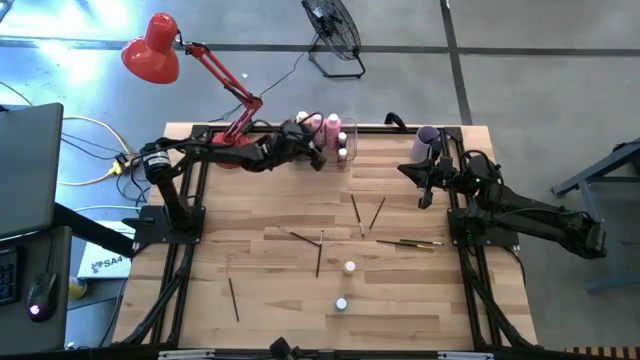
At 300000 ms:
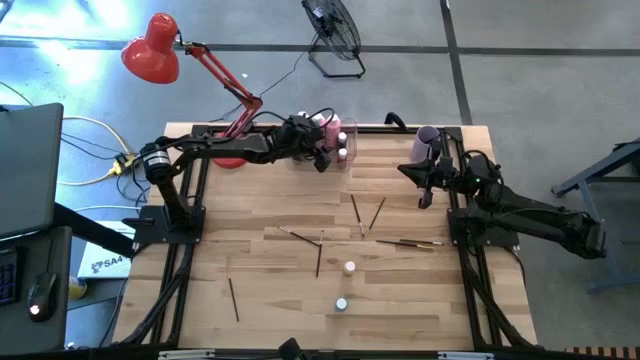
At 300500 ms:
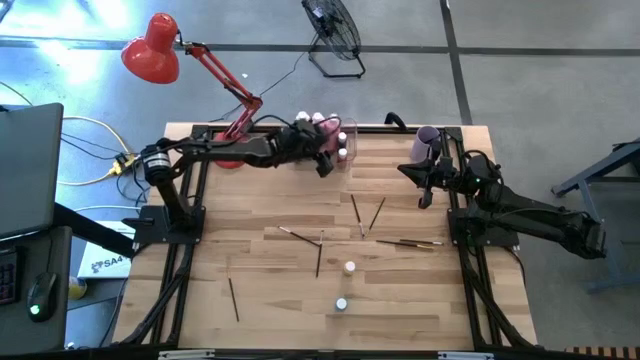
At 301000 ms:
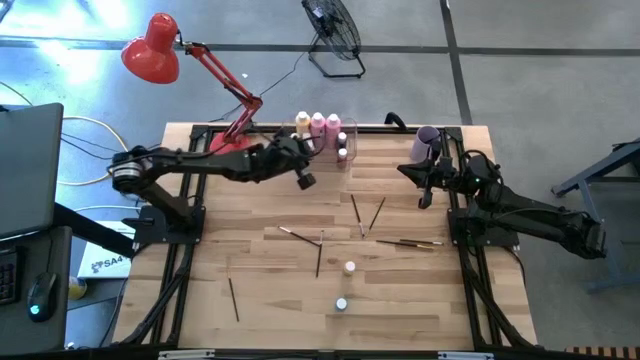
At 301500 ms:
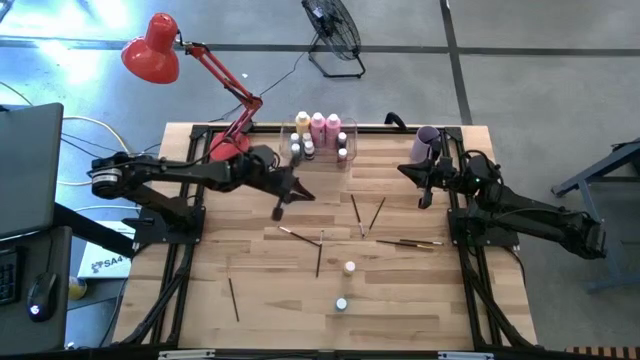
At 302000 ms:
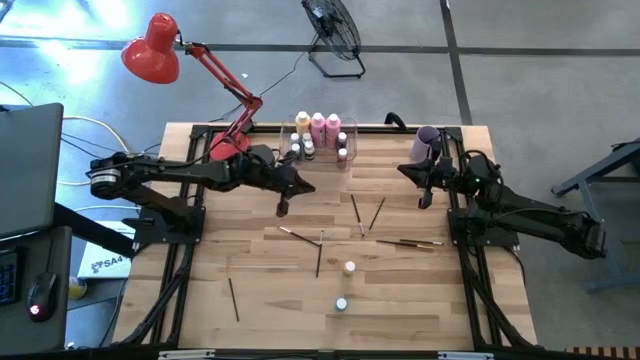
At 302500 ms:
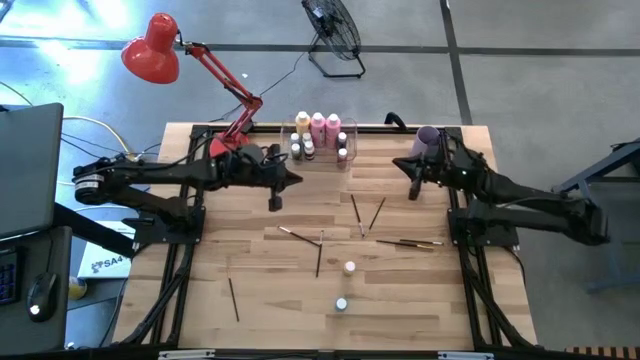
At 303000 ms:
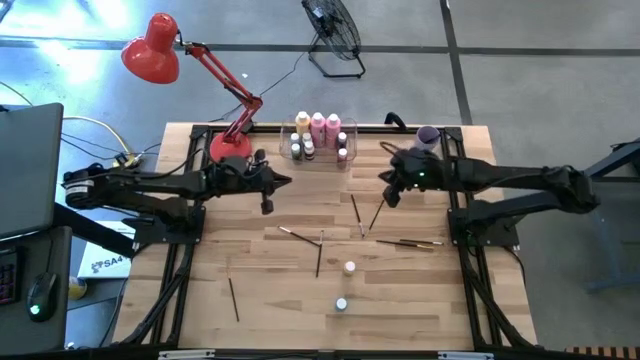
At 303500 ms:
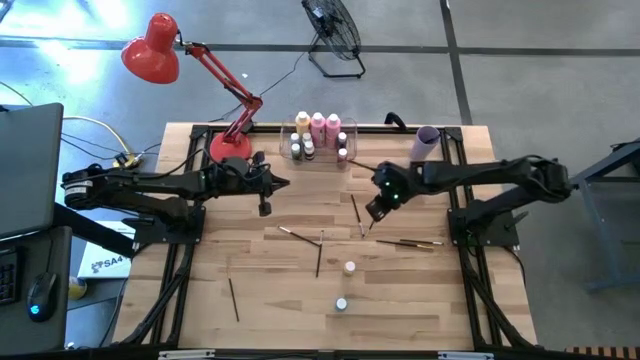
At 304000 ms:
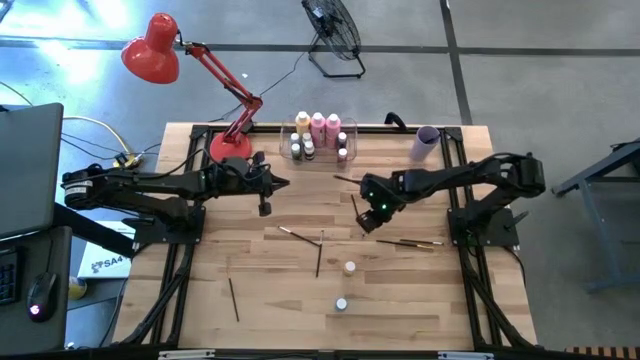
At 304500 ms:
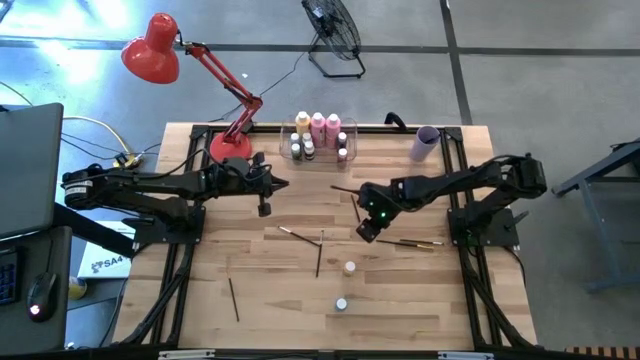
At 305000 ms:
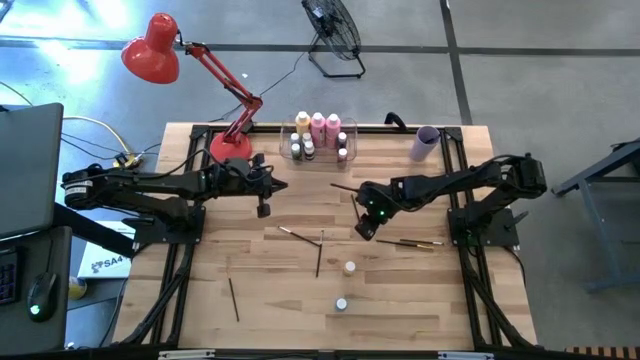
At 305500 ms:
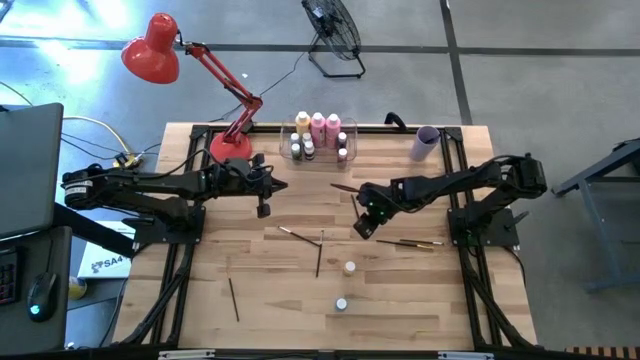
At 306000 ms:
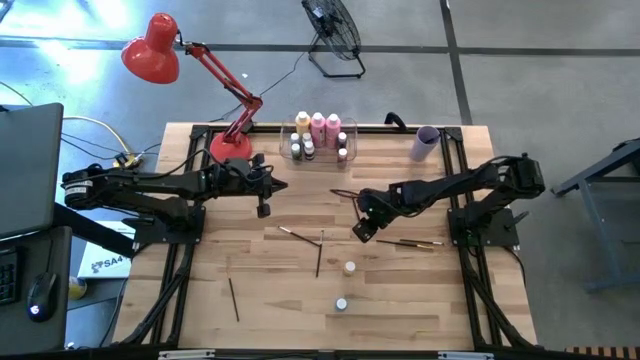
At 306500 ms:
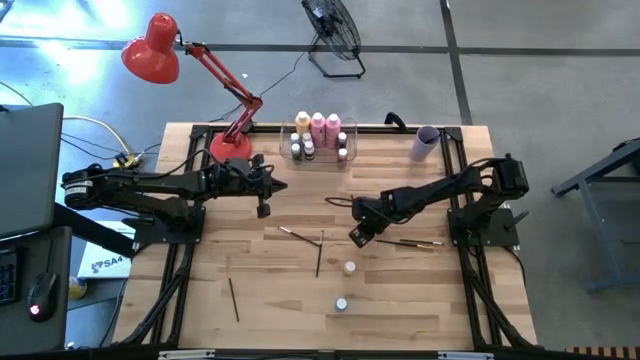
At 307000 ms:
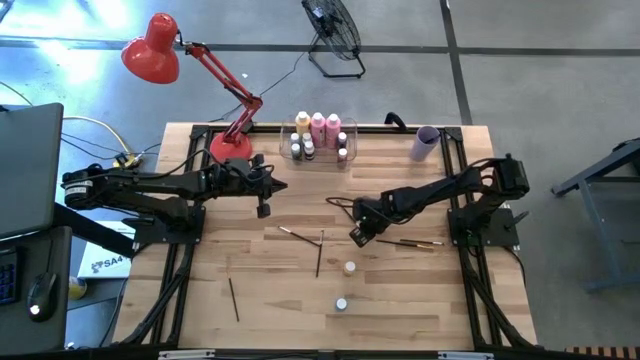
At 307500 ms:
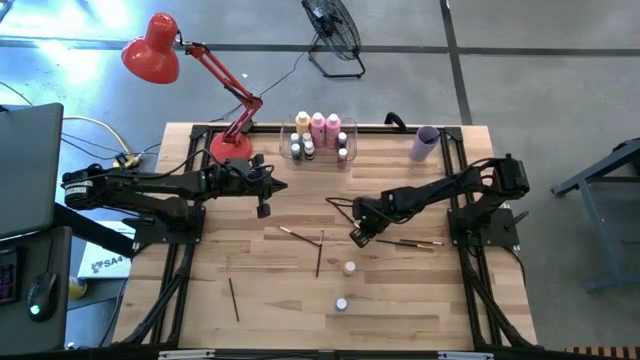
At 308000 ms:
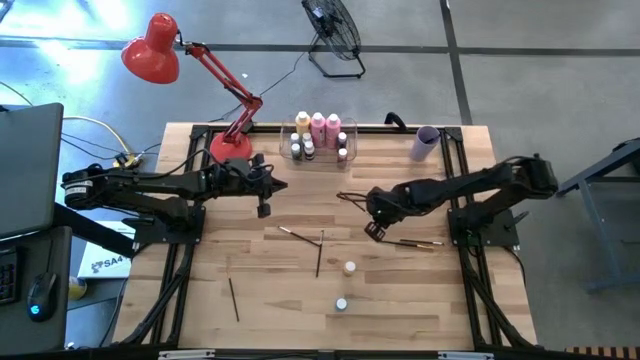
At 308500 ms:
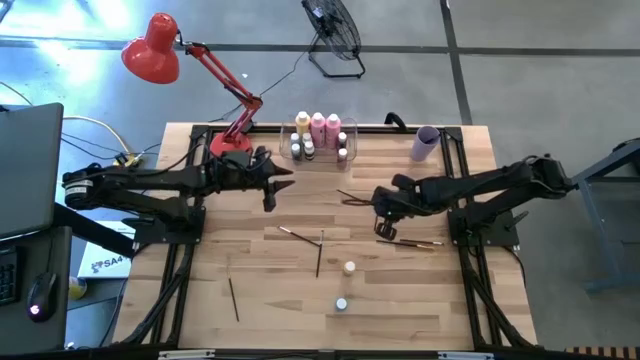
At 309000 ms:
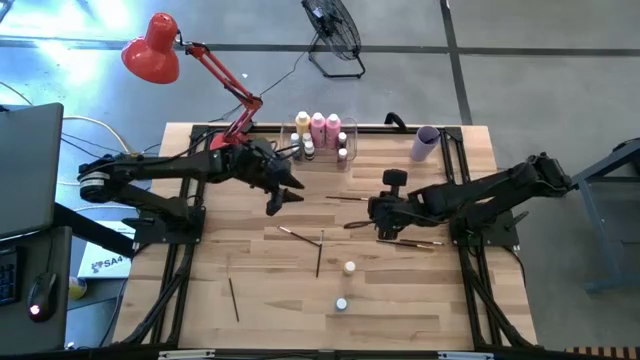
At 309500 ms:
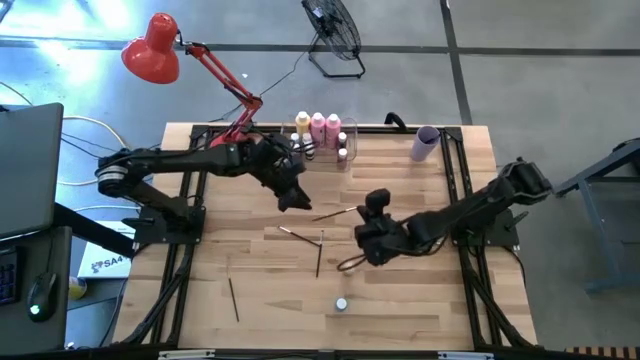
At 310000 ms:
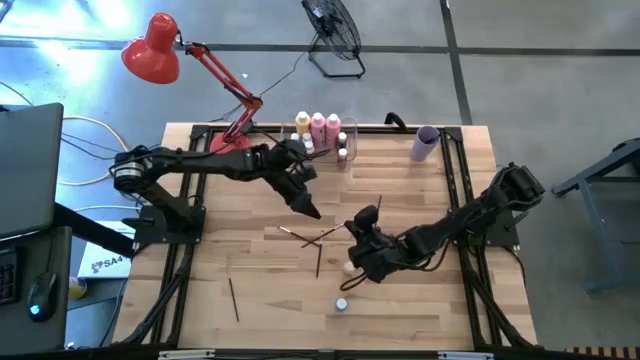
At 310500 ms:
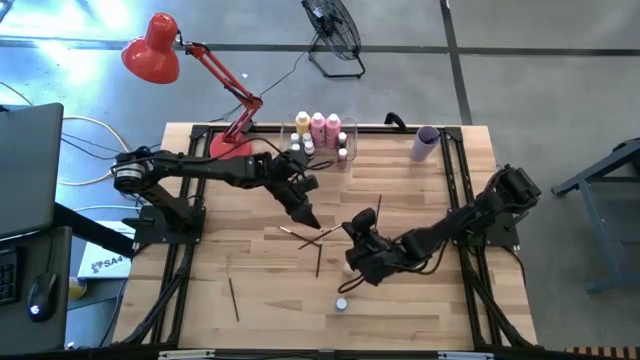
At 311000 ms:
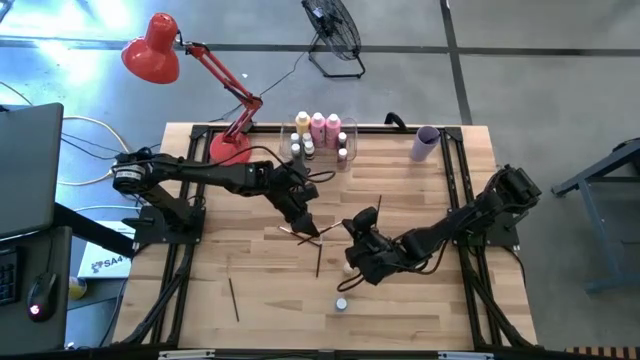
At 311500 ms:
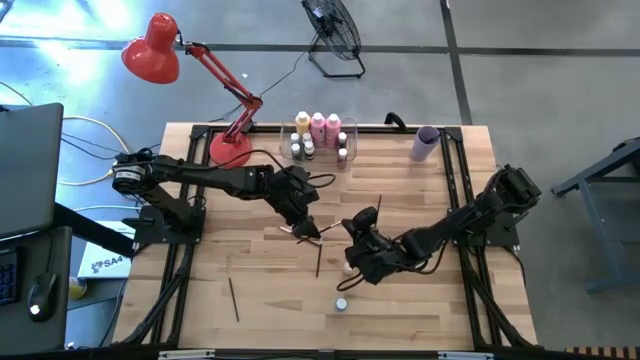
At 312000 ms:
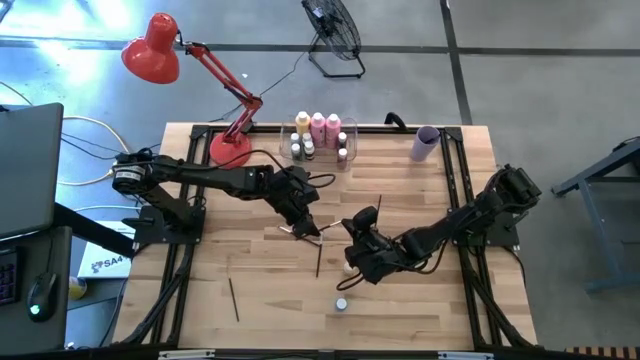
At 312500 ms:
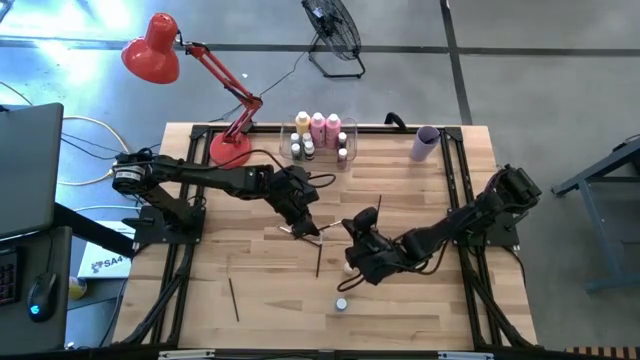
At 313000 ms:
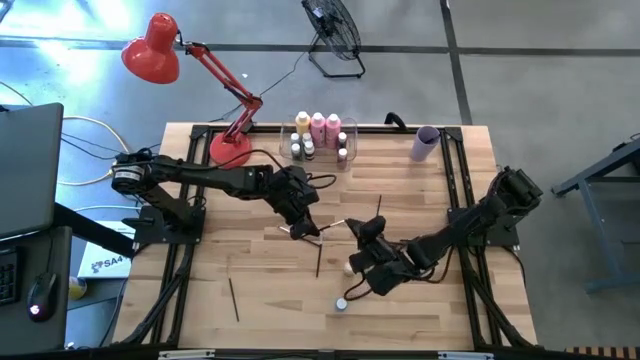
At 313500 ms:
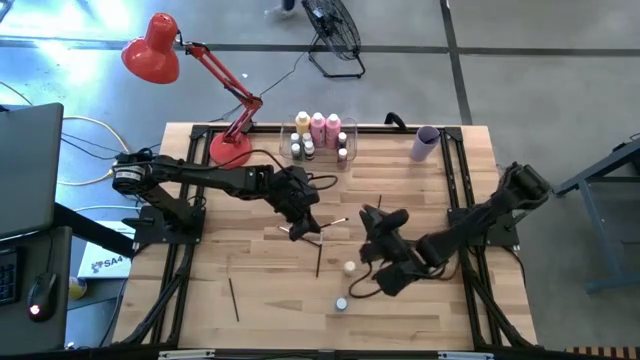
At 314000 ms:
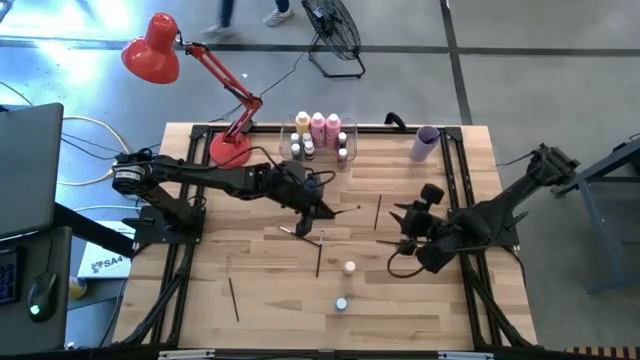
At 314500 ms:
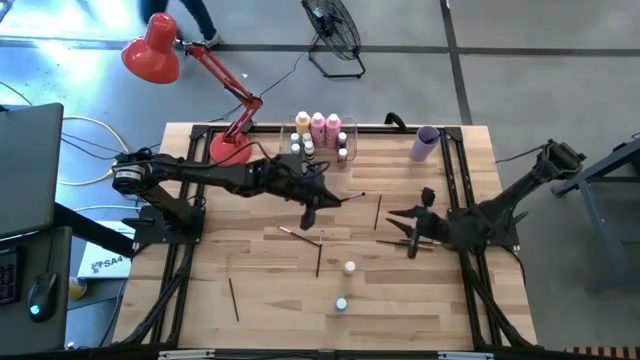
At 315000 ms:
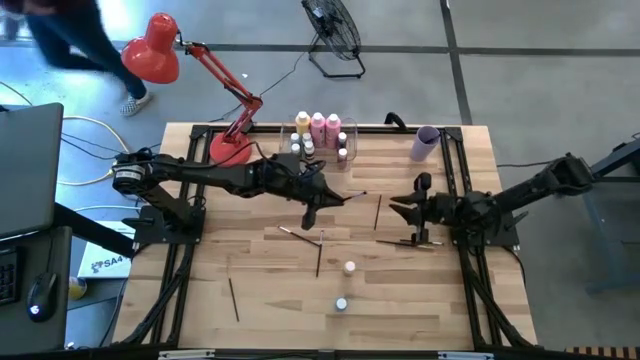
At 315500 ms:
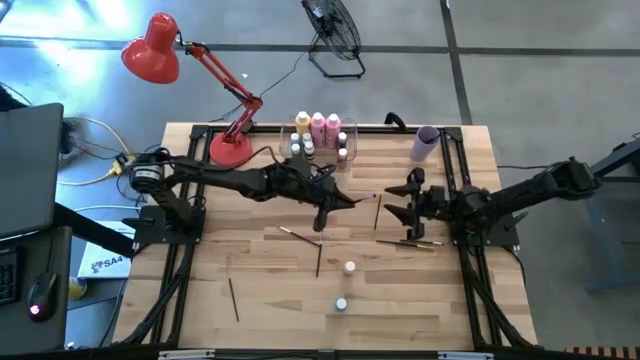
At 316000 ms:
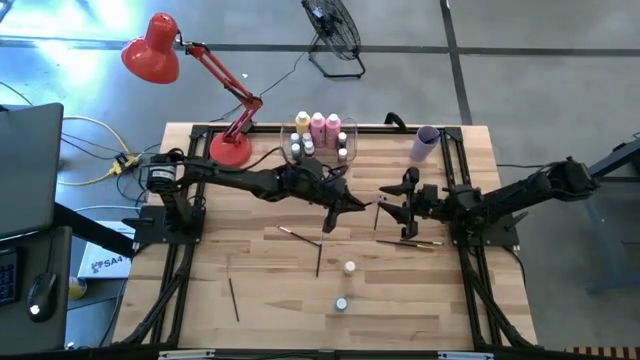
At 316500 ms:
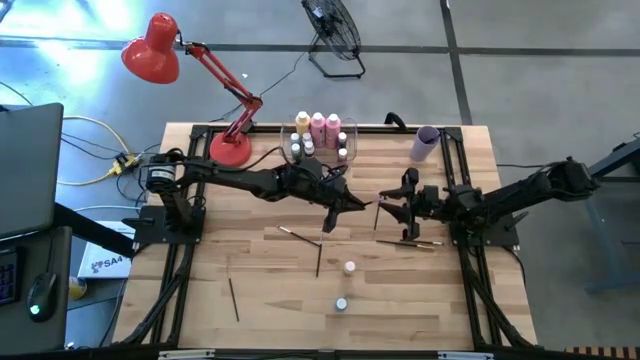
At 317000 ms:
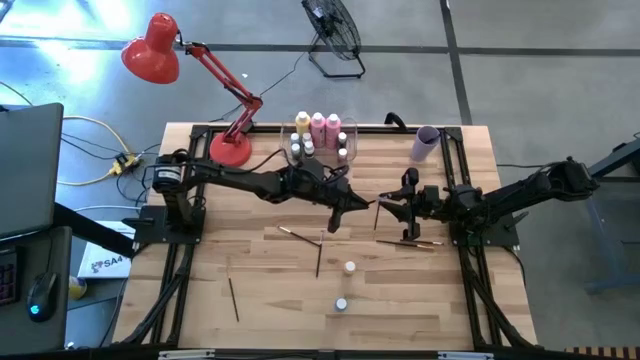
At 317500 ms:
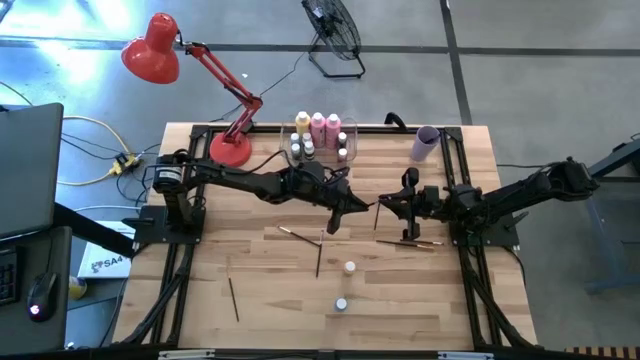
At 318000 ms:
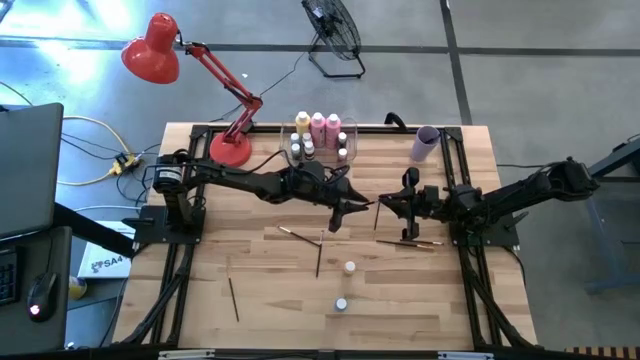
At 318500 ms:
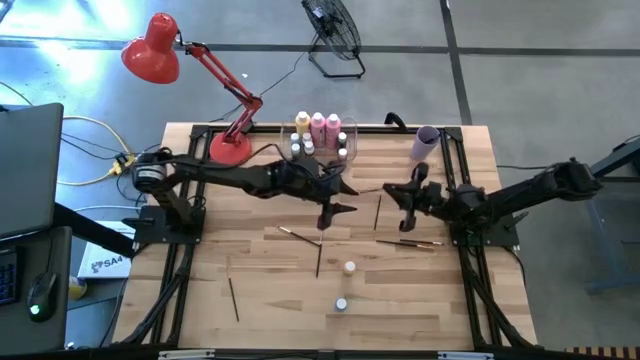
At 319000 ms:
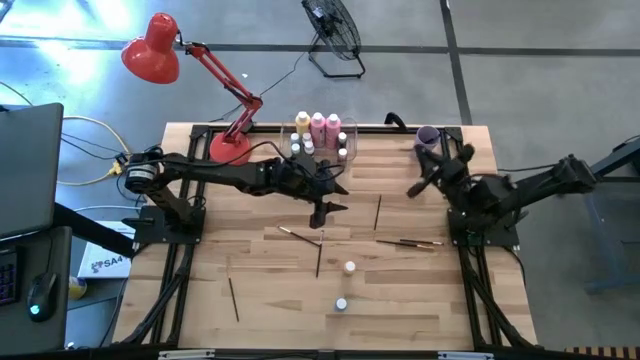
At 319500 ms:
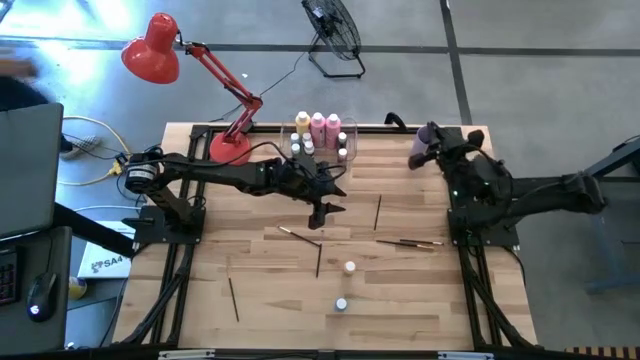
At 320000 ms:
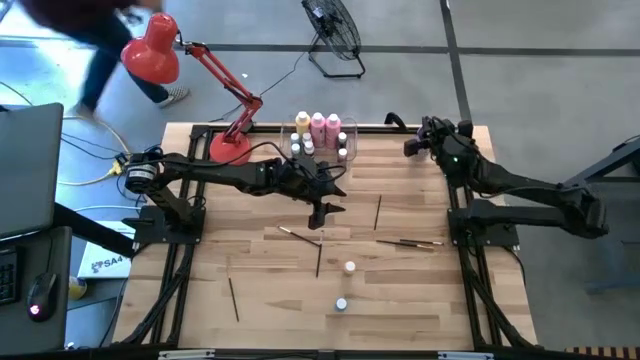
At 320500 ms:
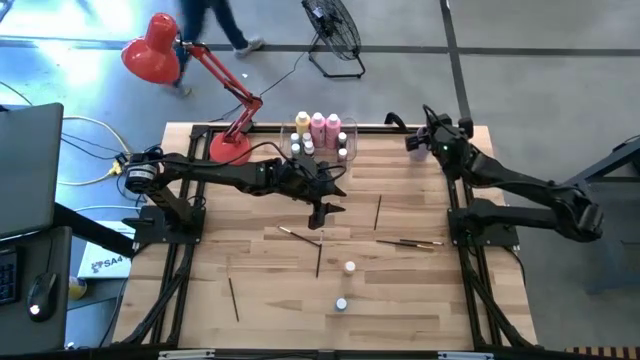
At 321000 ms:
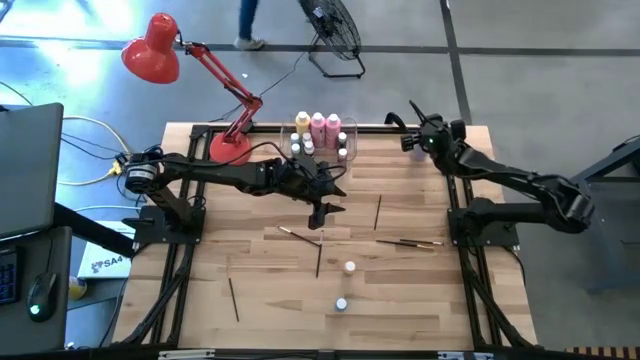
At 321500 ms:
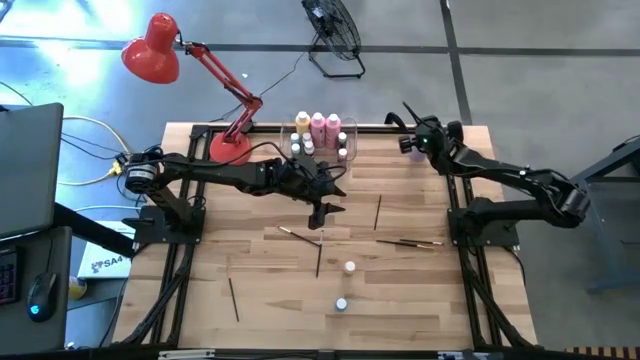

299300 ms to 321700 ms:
Task: Pick & Place Paint Supplies
Put the black paint brush into the violet cup

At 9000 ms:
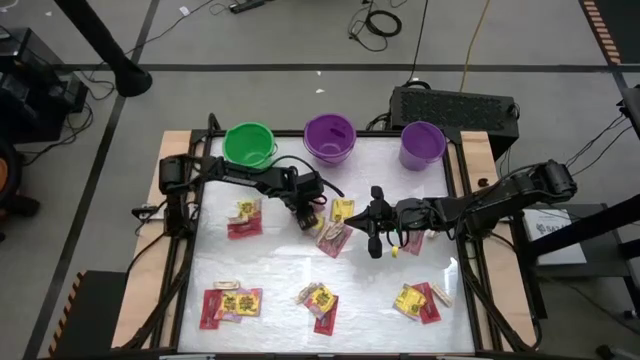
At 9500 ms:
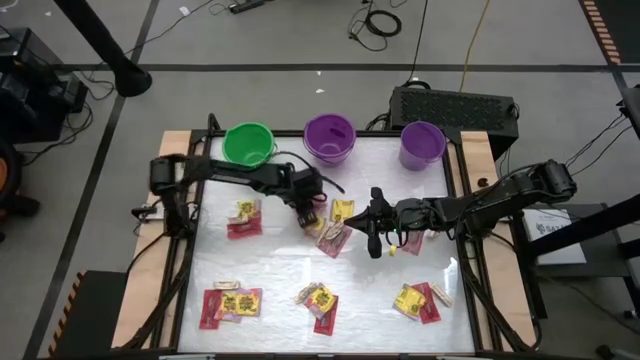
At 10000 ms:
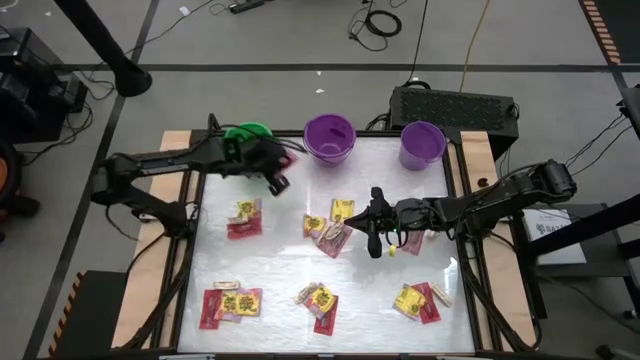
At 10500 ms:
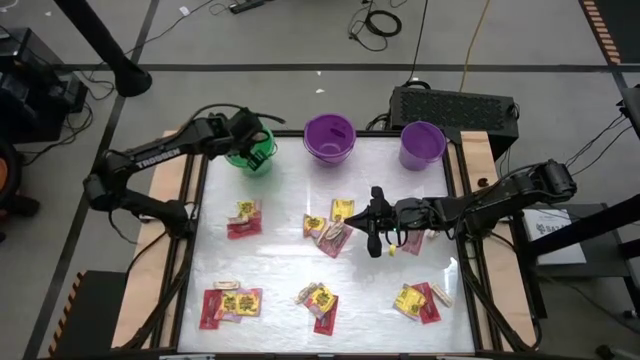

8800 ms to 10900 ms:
Task: Sort candy by brand, put in halloween buckets
Put the red candy pack in the green bucket
